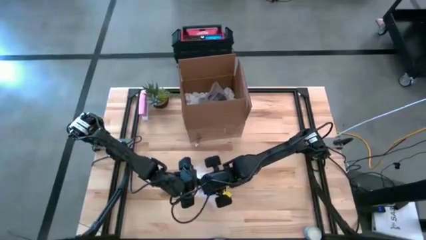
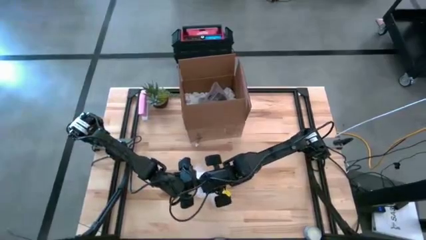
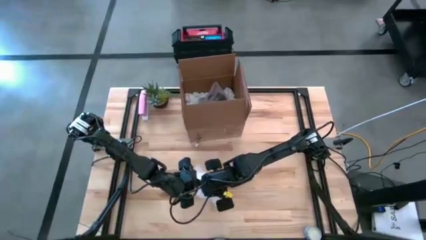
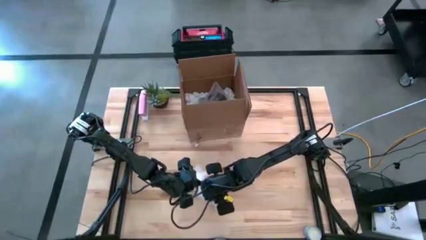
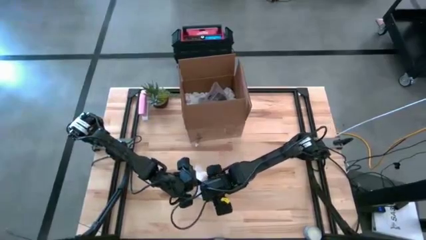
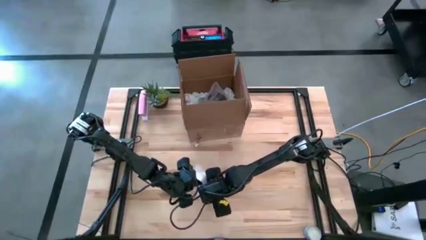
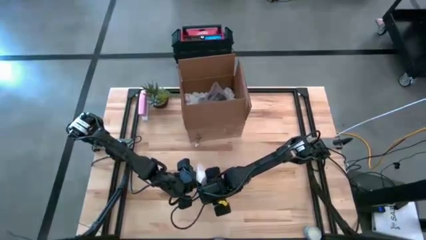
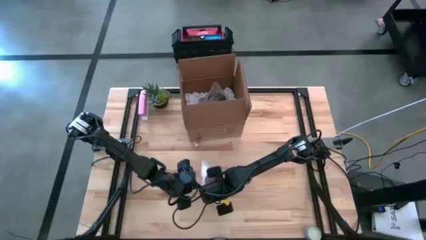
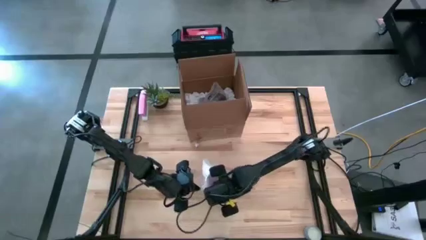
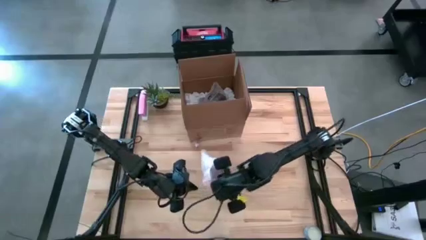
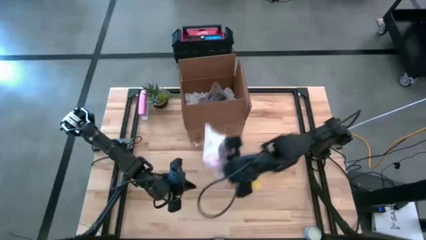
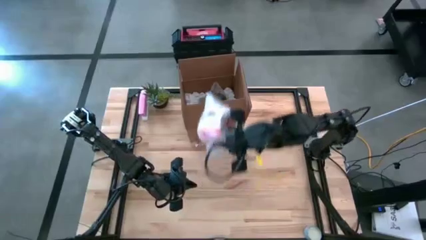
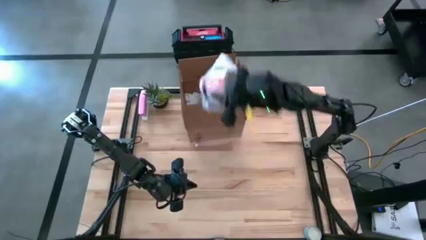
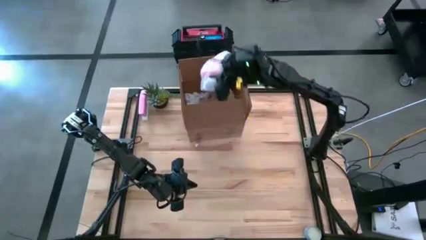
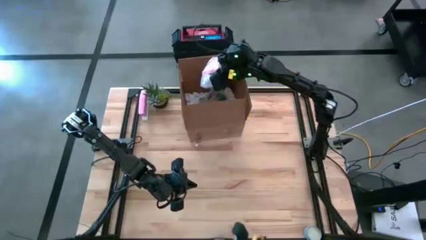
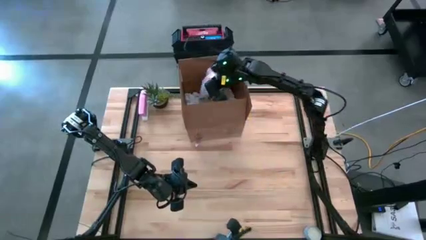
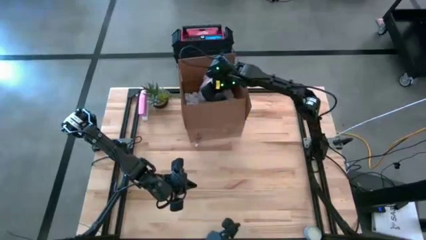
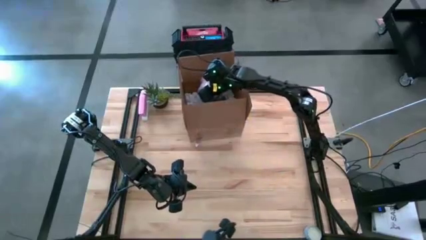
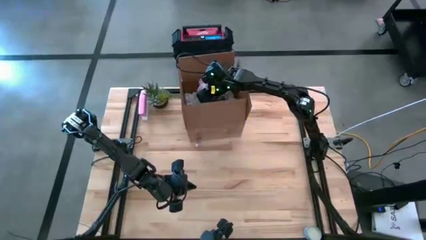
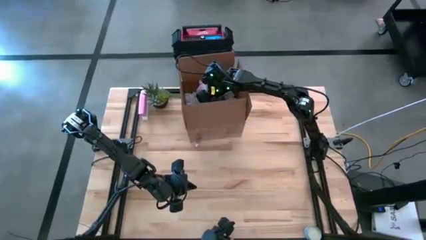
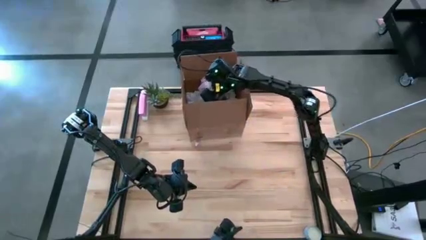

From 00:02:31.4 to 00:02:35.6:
Task: wrap mug
Put the wrapped orange mug into the cardboard box

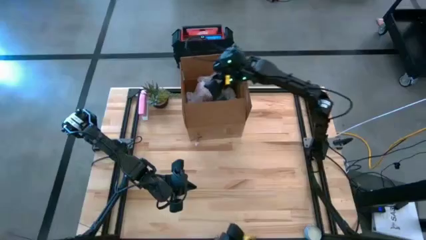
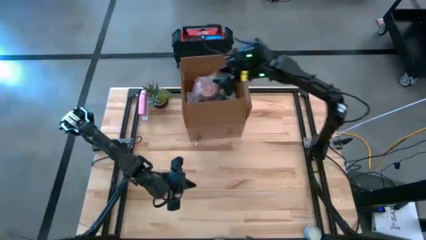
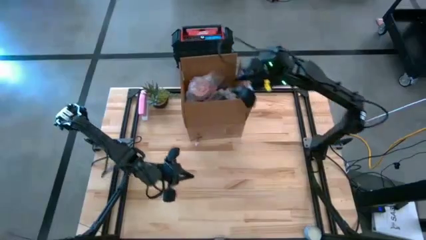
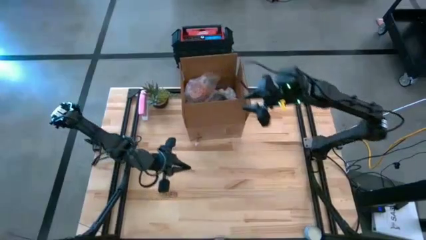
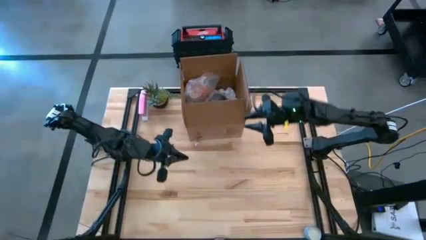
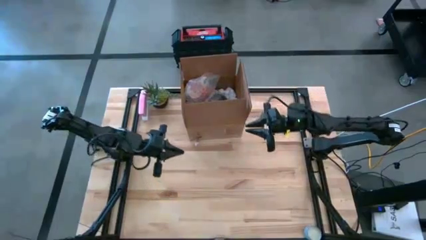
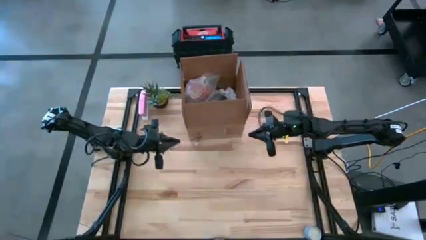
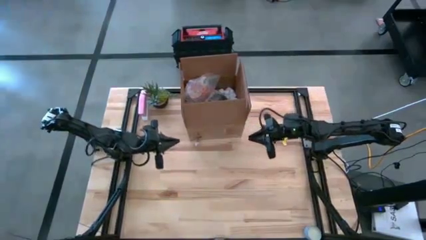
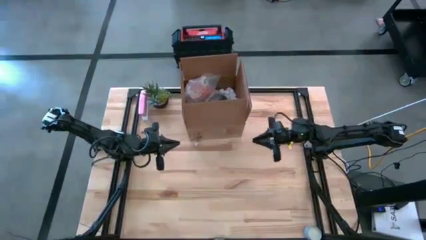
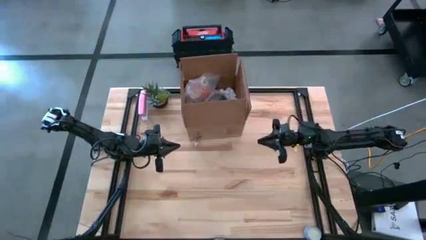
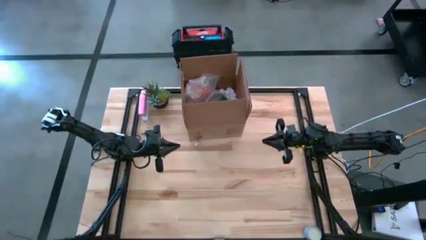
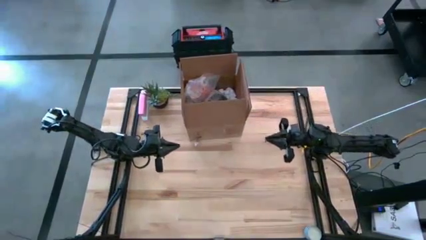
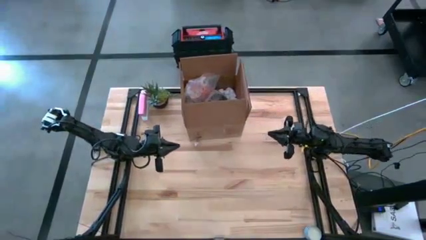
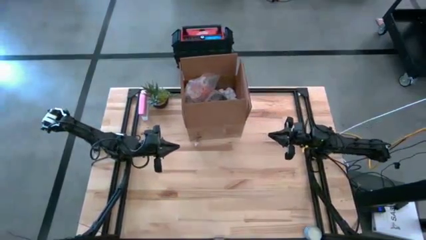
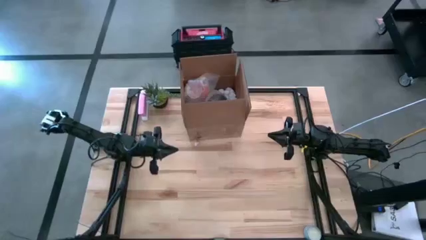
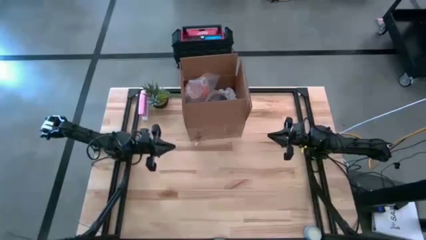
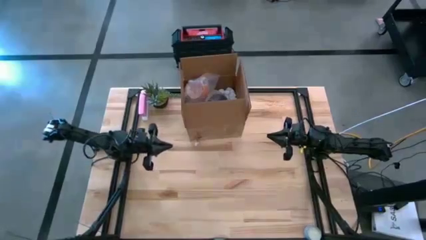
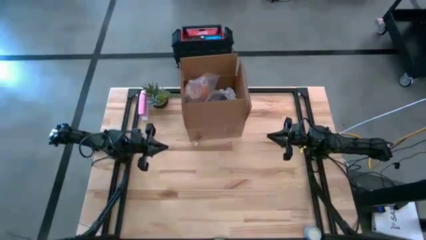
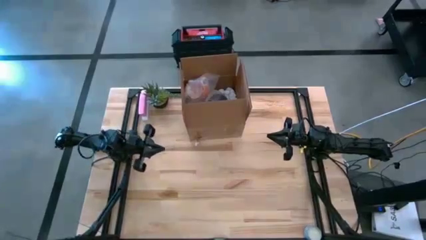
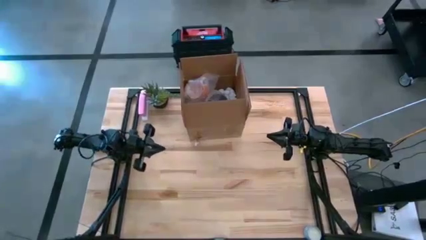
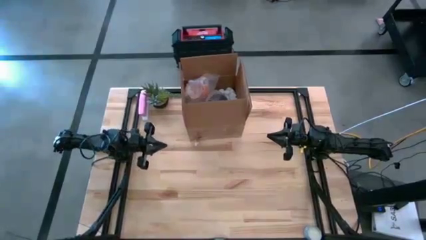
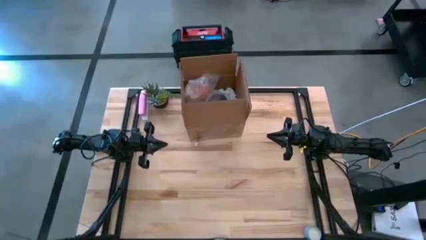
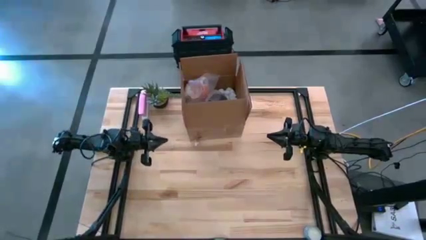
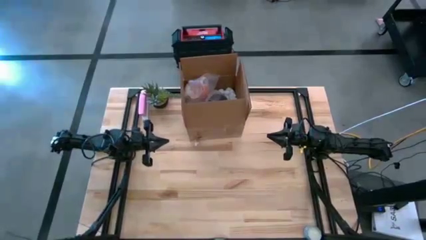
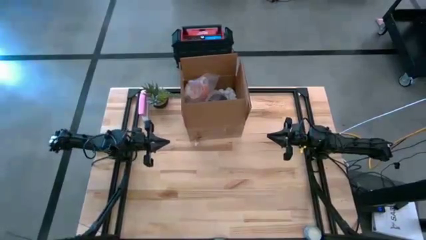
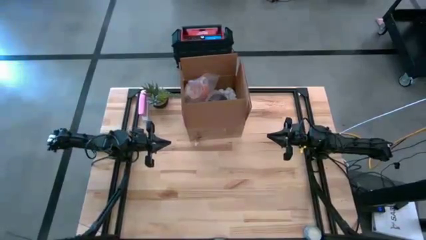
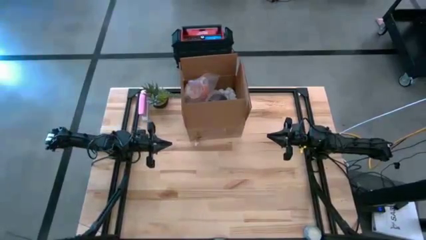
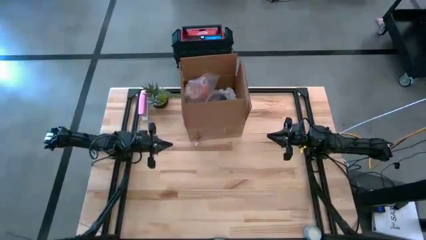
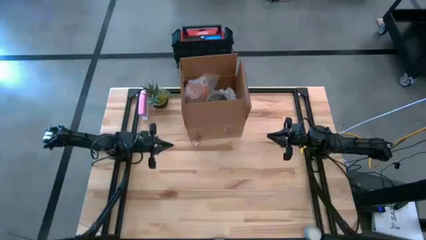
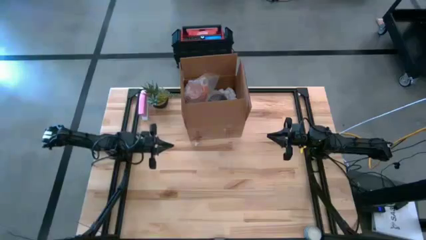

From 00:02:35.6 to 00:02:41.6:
Return to Home Position

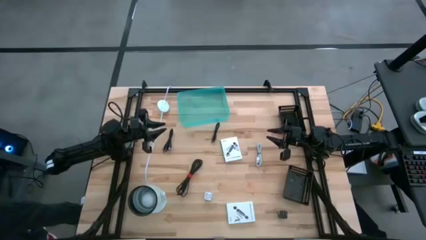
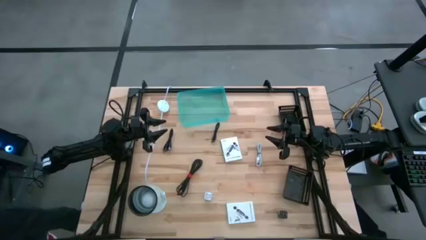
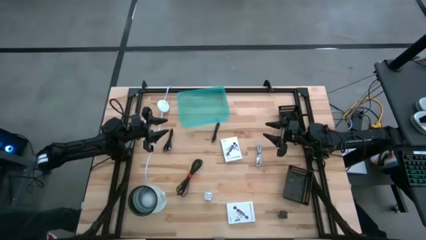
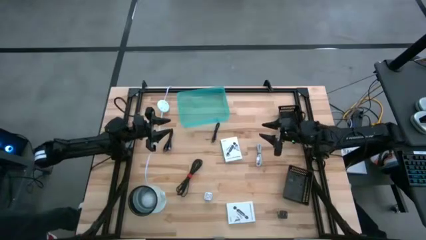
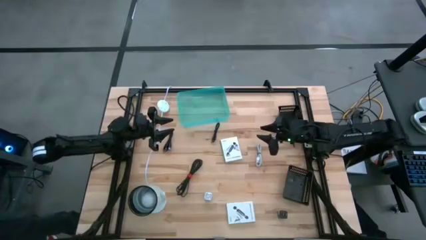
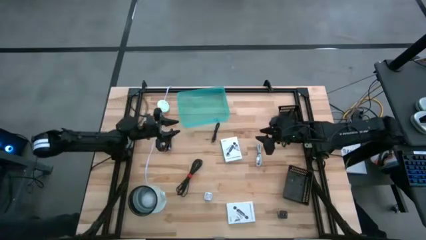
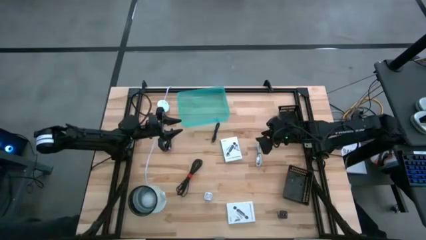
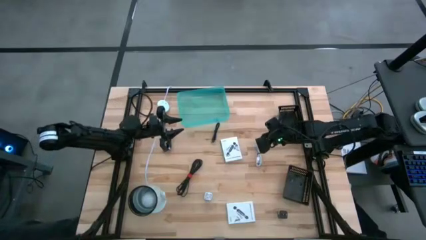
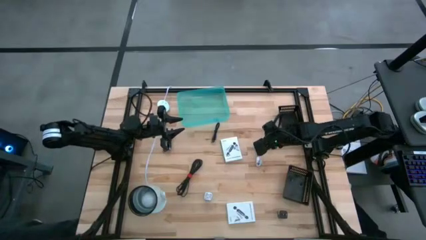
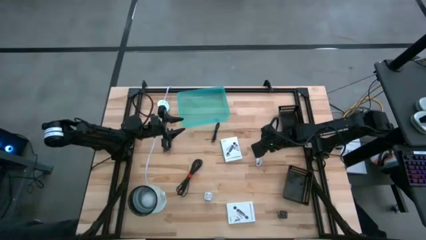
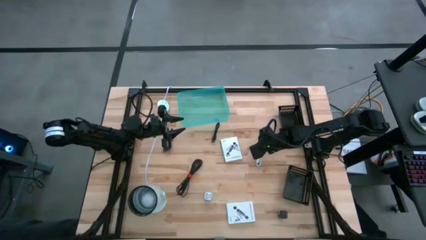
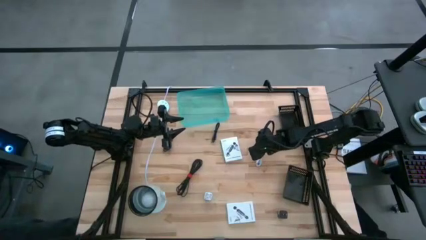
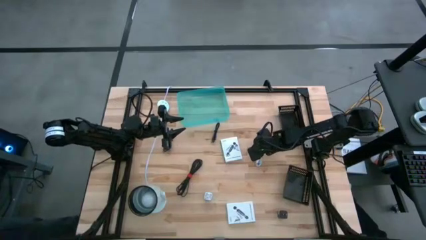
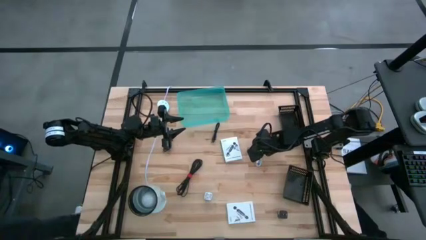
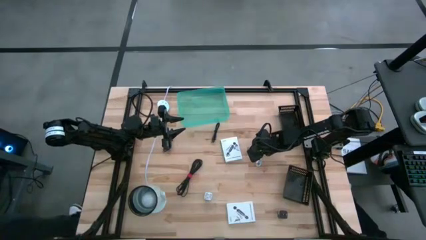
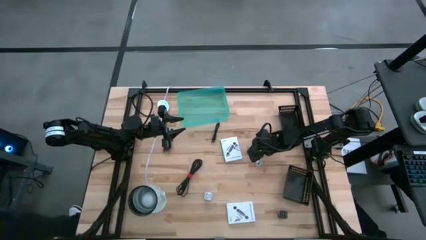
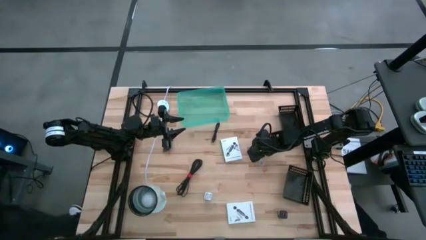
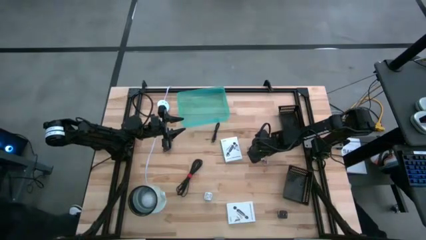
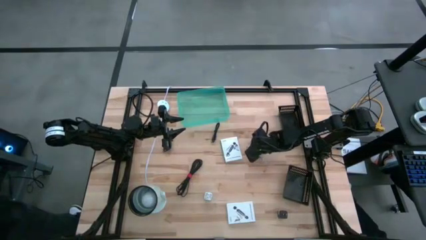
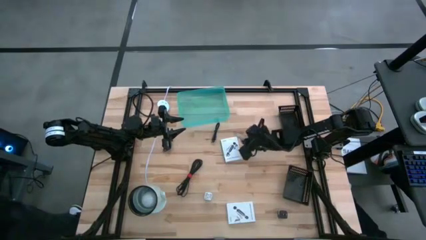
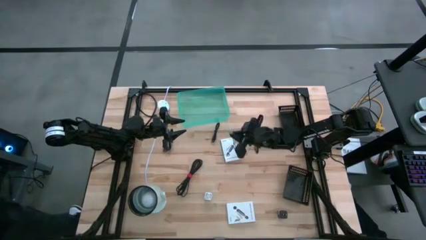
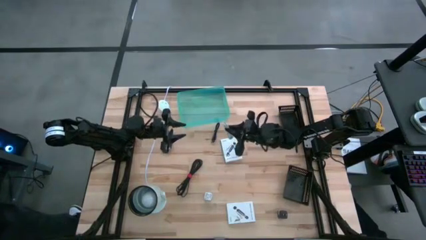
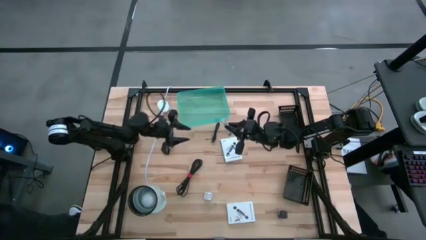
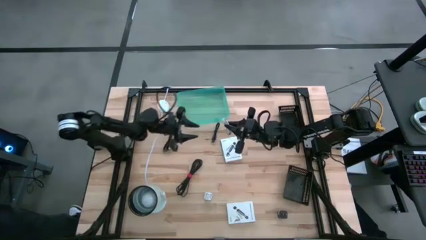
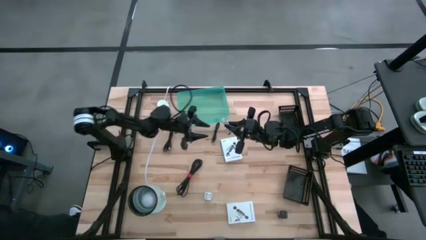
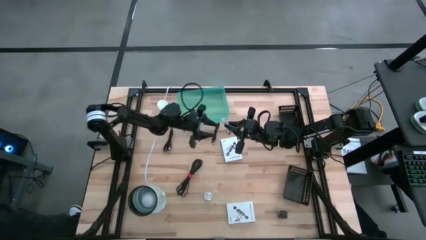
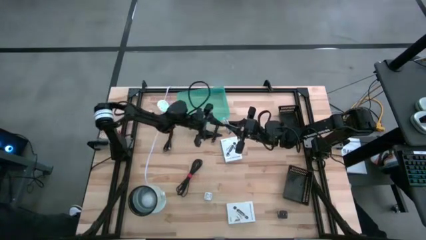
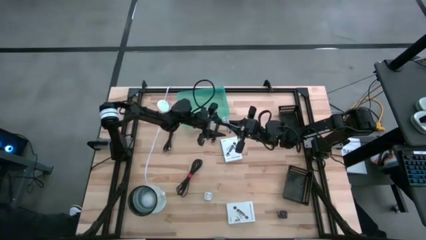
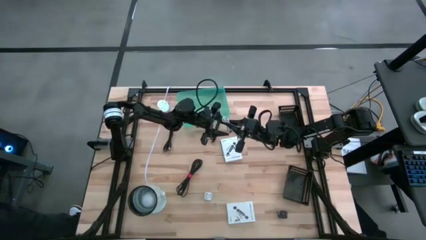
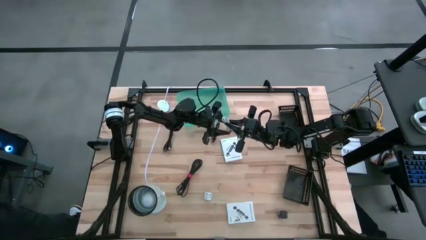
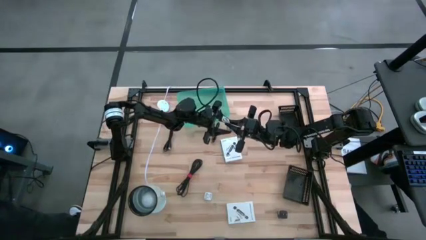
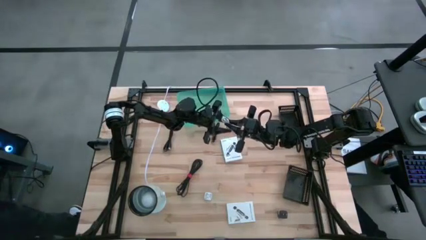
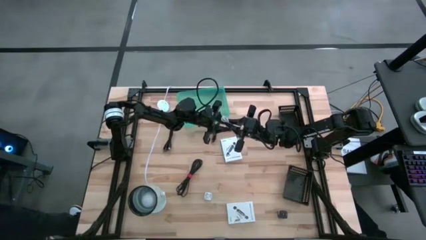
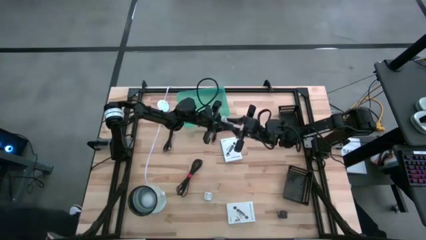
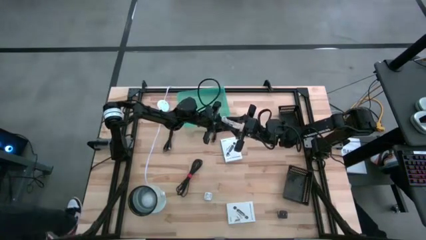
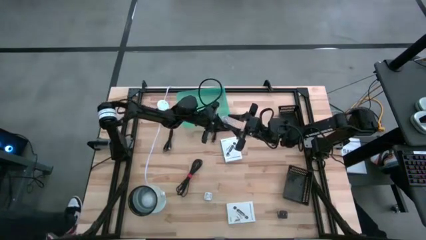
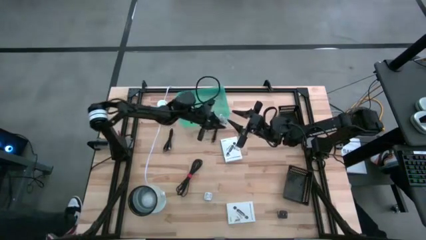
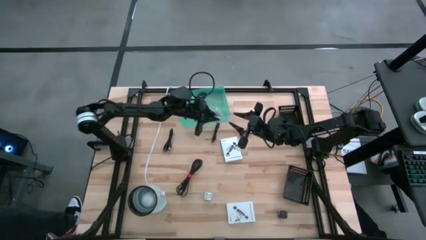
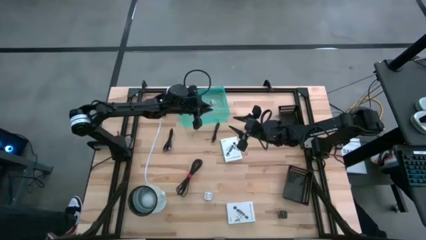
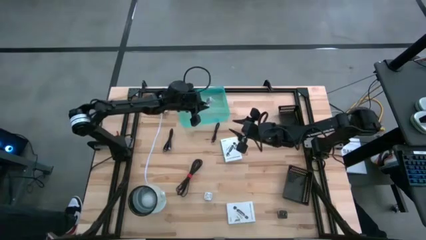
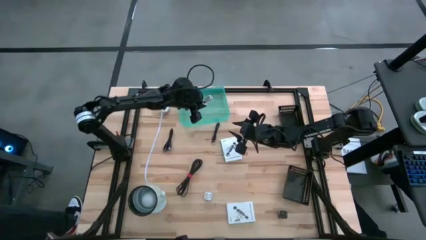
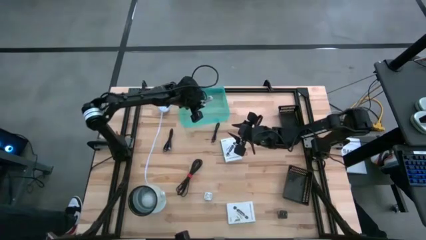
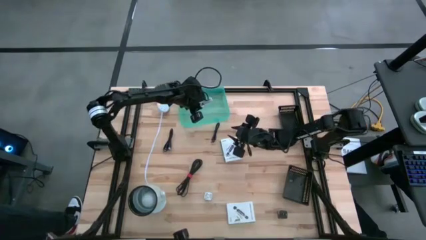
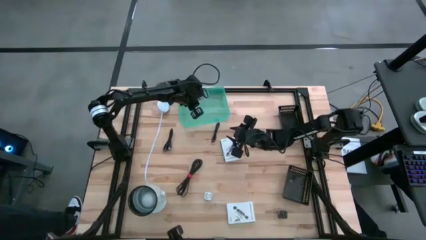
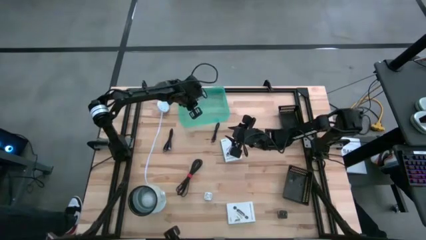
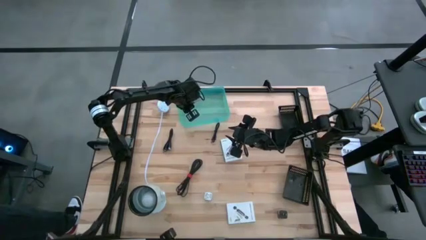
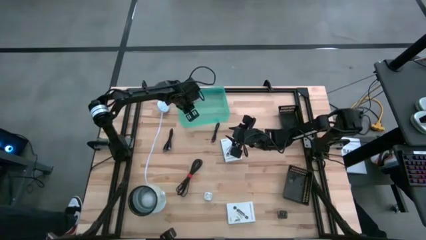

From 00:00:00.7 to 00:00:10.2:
Task: Pick and place items into bin
Put the white charger cable into the blue bin
